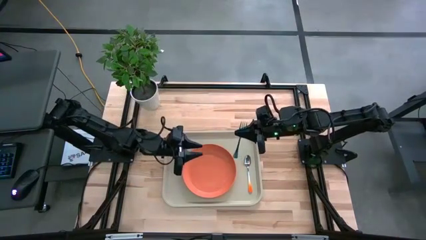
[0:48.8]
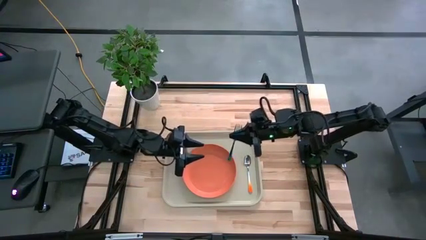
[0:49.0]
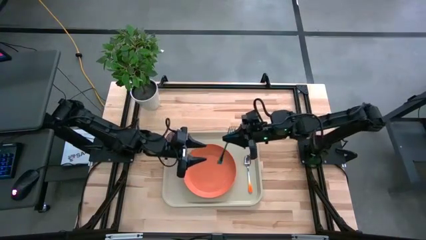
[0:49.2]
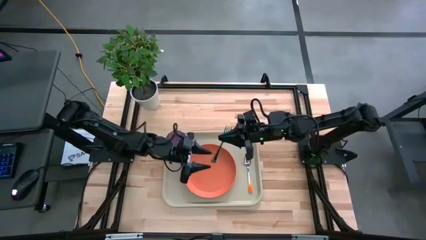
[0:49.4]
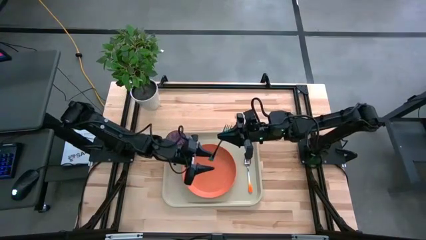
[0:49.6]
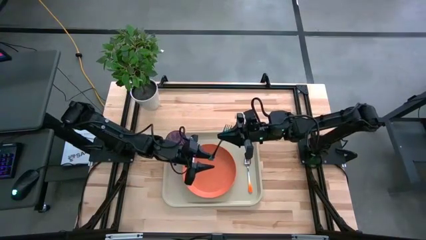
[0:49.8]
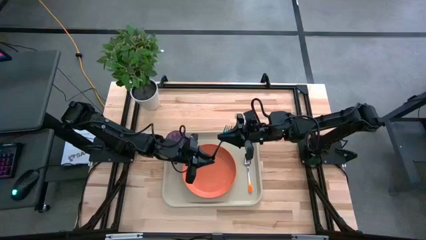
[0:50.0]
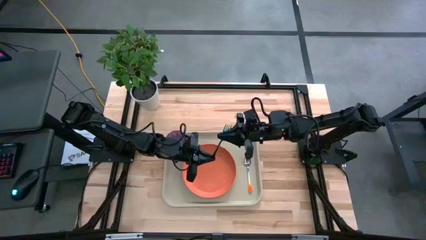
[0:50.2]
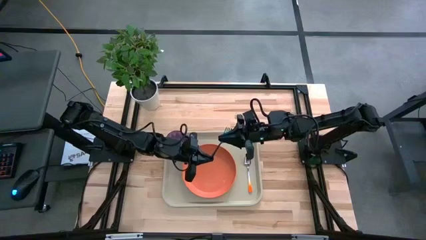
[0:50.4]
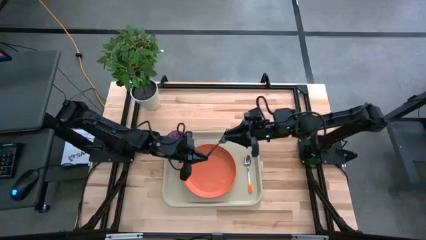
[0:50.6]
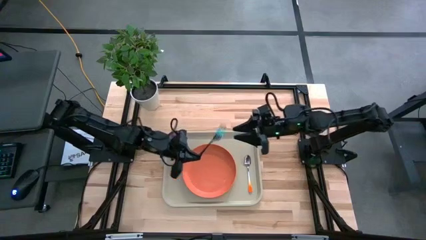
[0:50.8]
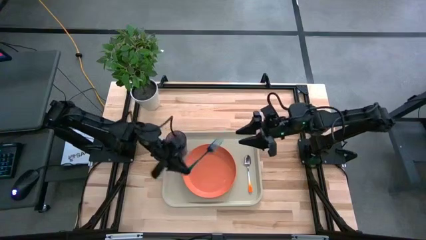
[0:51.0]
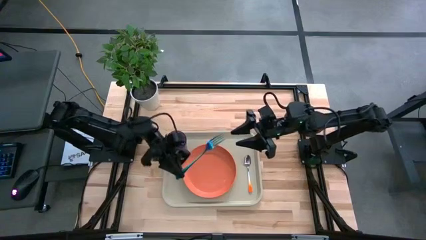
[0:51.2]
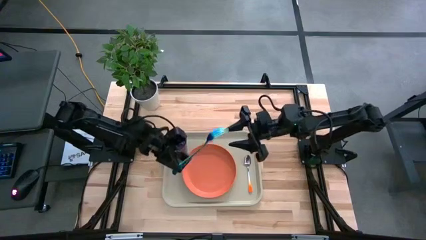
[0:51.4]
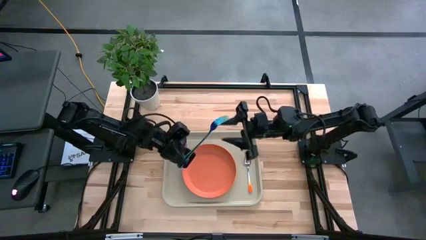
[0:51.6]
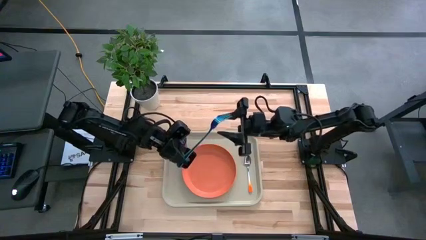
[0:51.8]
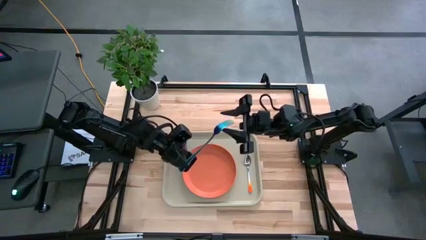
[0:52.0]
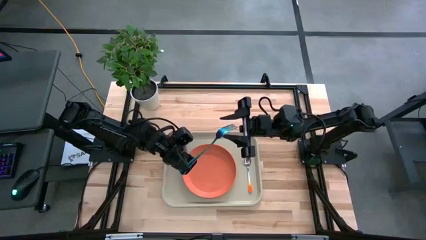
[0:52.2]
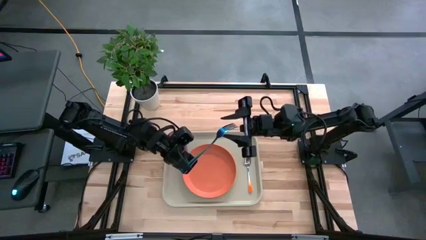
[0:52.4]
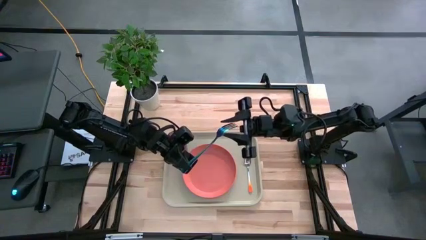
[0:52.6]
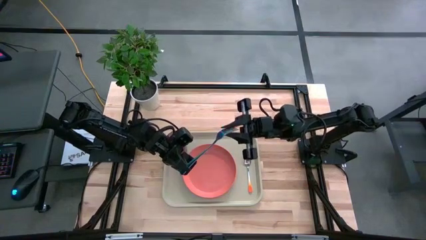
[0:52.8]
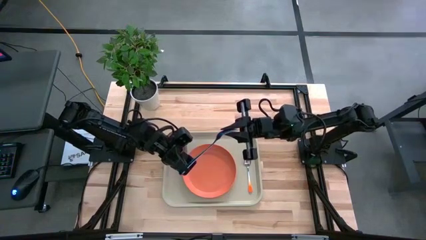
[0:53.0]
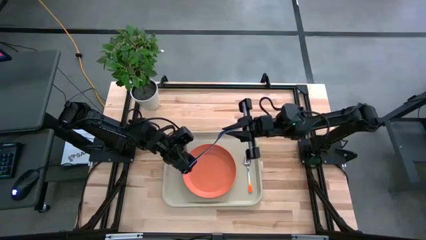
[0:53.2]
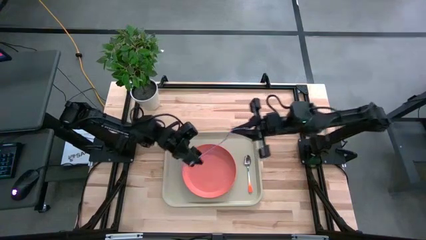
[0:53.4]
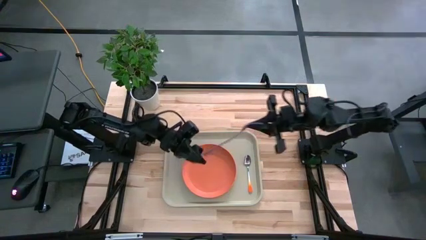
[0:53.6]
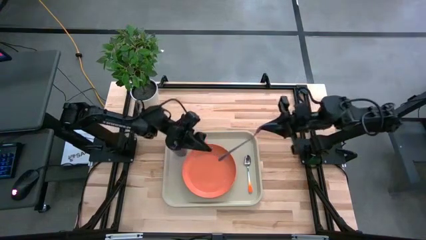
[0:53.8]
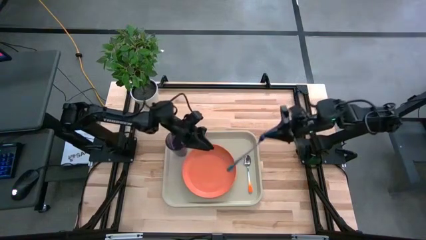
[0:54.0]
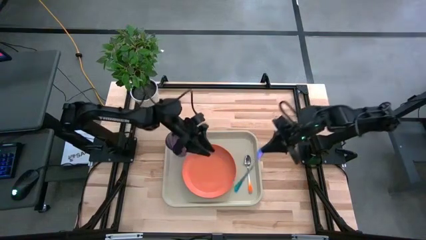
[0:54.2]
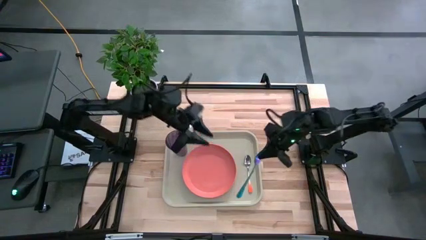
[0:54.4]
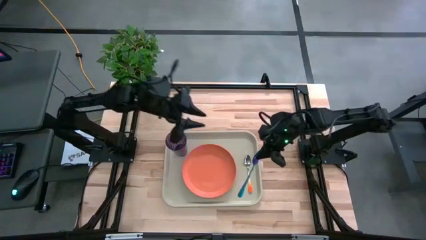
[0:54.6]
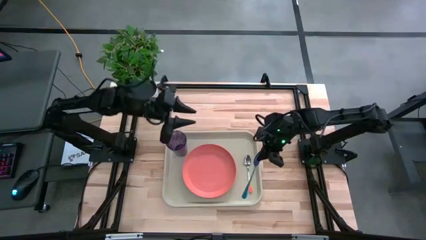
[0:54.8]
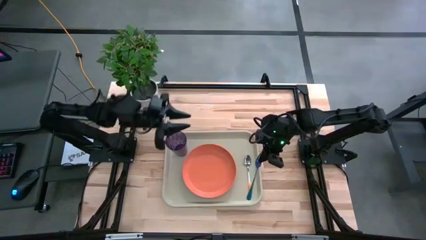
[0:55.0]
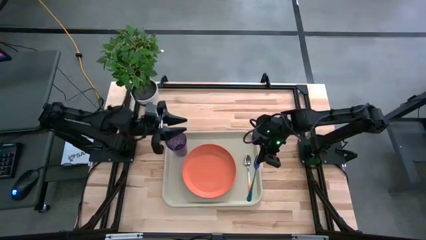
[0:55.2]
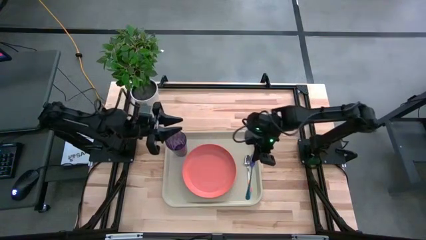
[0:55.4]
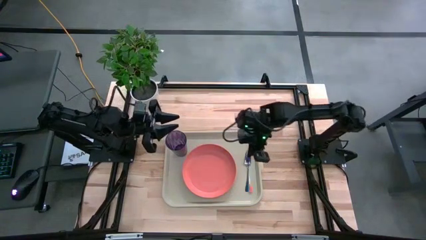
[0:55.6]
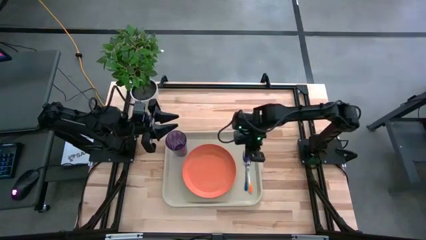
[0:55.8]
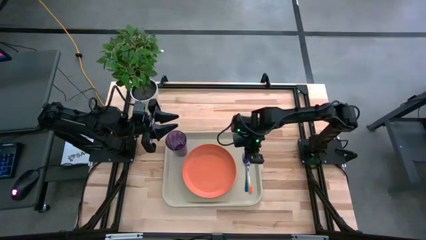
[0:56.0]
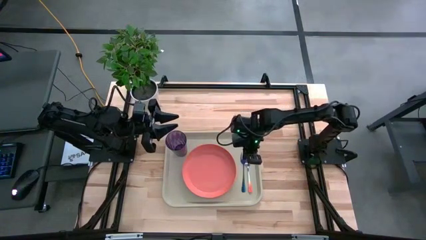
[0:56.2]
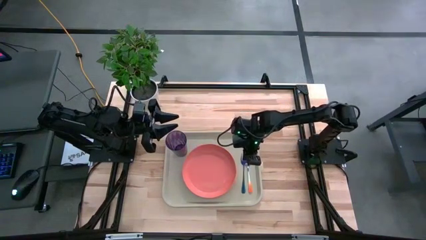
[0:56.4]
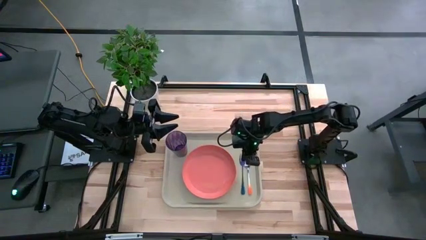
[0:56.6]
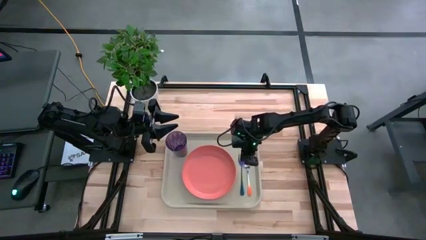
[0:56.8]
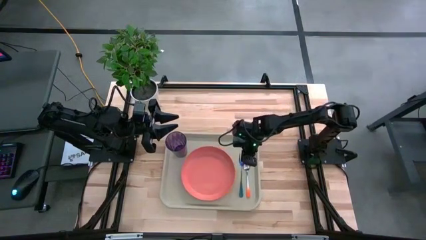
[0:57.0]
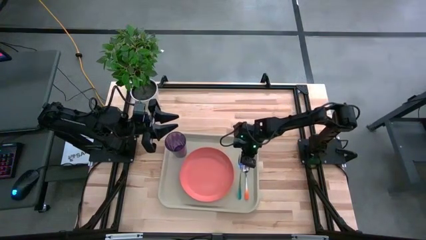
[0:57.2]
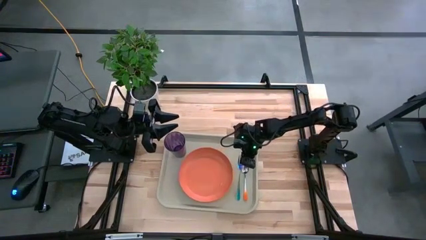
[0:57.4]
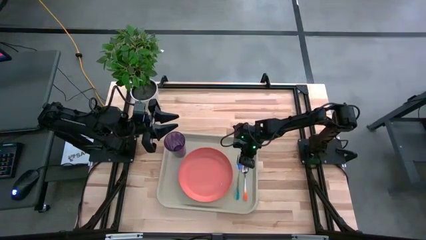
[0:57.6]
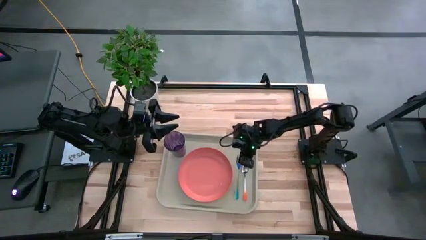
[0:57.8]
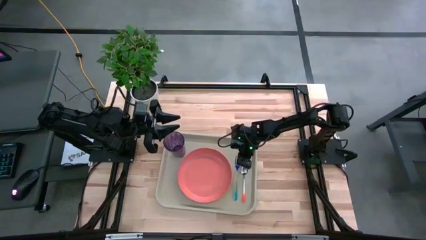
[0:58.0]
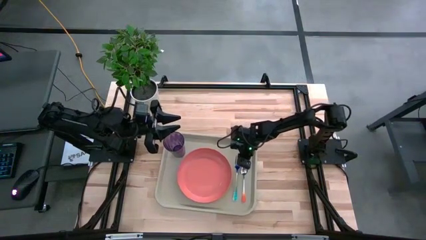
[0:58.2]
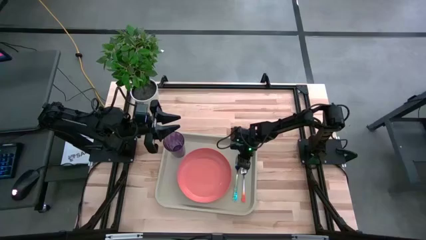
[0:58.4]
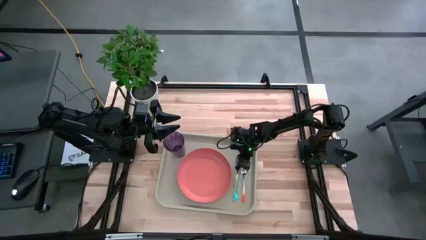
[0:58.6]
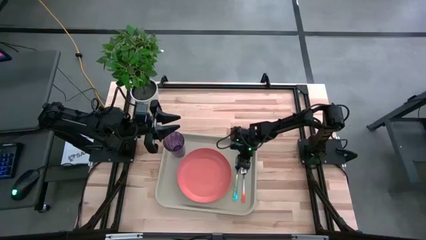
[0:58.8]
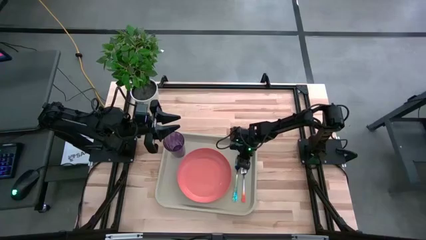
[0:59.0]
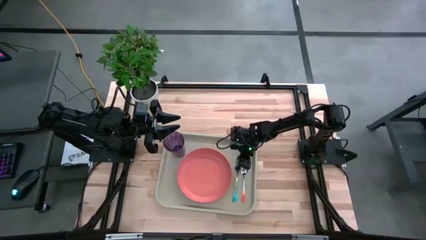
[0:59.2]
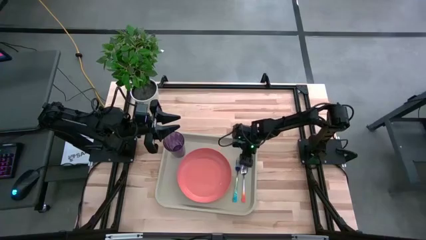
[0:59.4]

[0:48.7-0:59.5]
Task: Pick and place plate/cup/fork/spoon on tray
Put the purple fork to the left side of the orange spoon on the gray serving tray

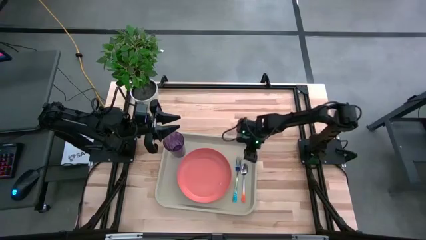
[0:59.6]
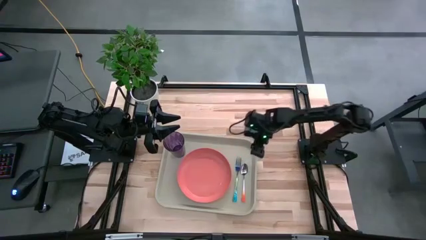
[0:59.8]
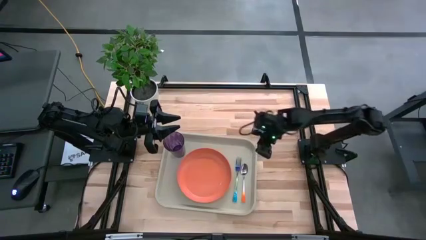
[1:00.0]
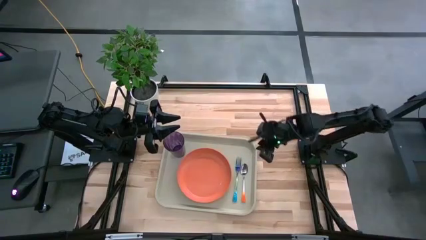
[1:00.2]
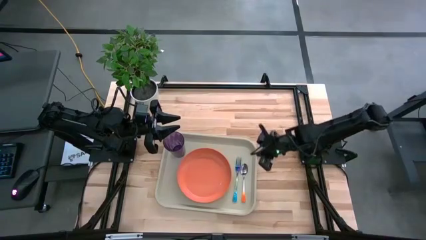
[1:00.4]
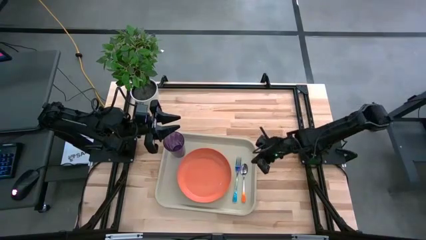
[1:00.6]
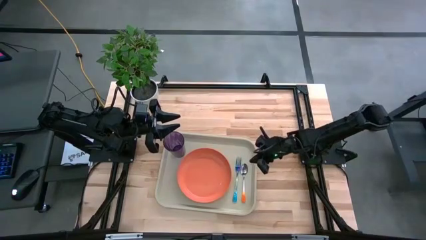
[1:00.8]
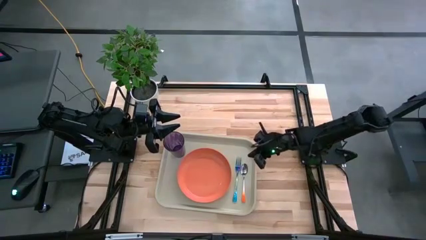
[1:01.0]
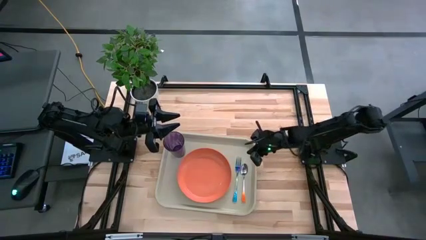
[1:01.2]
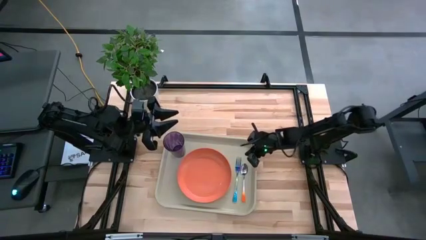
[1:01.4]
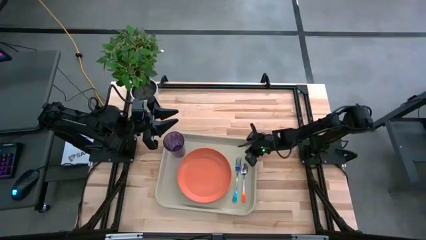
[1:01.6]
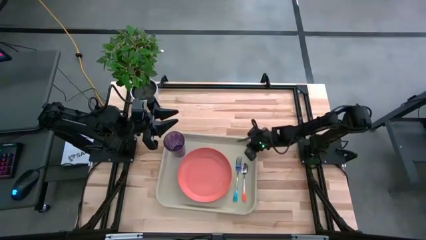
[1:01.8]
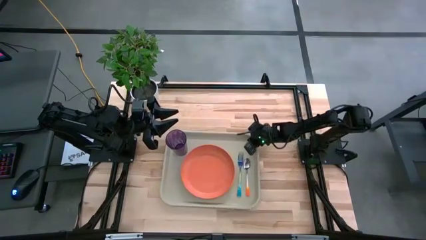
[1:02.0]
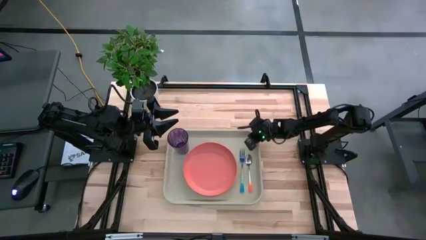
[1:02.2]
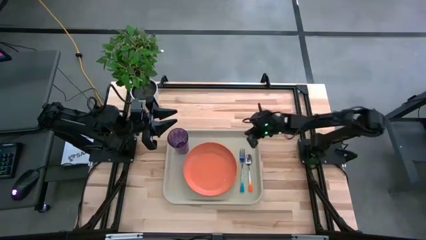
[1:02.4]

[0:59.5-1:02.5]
Adjust the gray serving tray

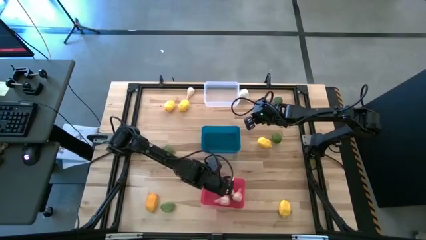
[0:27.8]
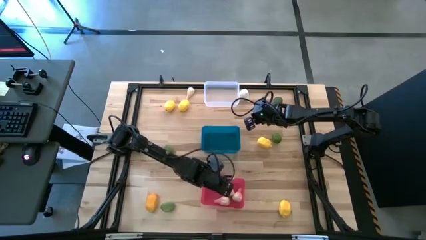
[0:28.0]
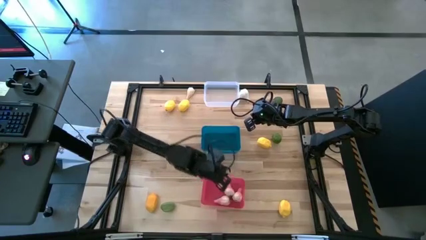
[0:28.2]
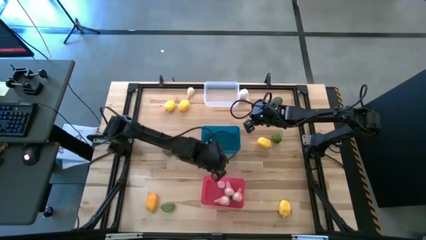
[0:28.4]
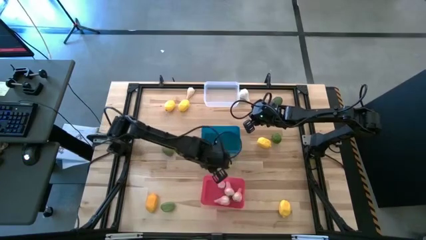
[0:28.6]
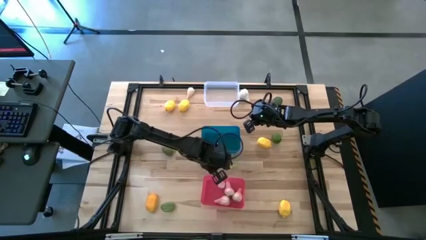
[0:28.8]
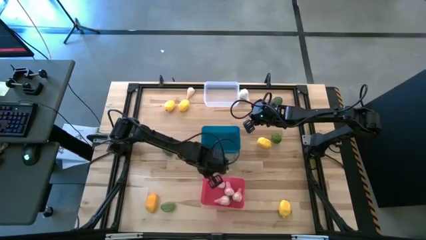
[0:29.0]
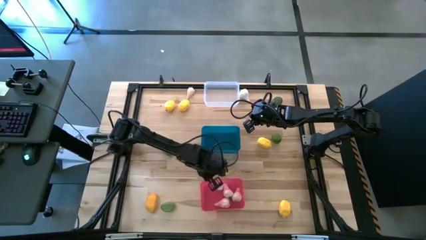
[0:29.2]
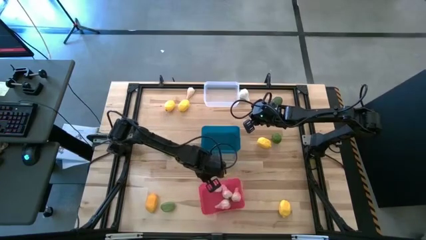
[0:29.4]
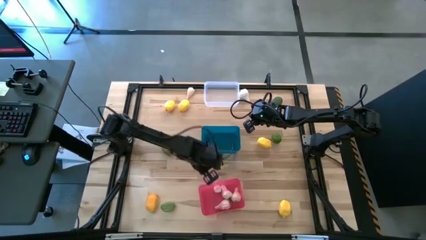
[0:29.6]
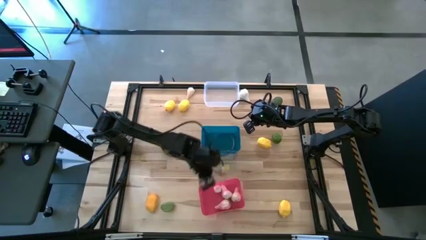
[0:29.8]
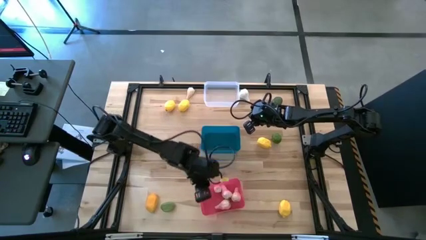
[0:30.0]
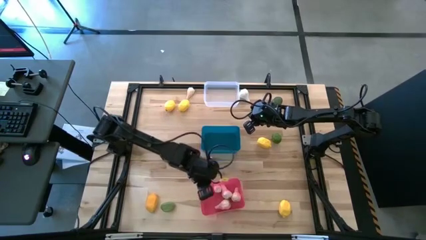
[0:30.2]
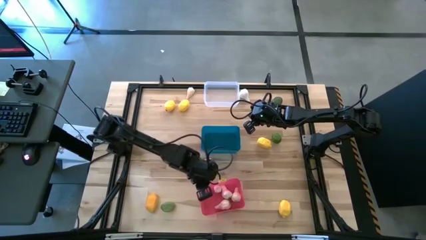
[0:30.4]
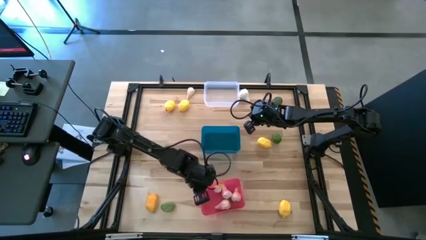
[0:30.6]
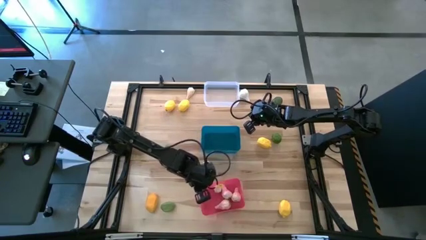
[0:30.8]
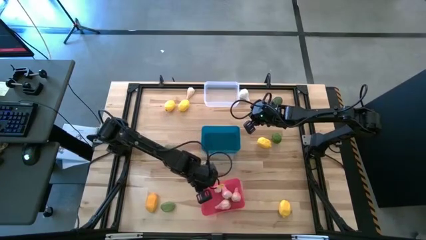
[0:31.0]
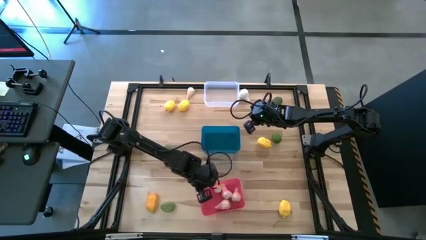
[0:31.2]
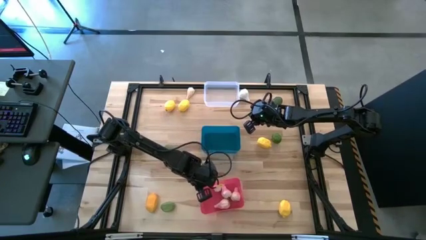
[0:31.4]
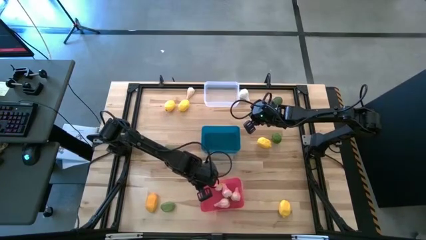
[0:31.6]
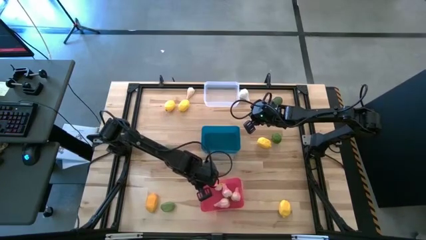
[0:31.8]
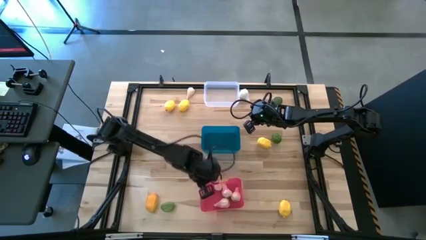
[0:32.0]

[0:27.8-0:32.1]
Task: Sort produce into baskets
Adjust the pink bin
